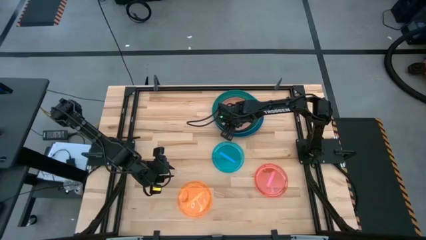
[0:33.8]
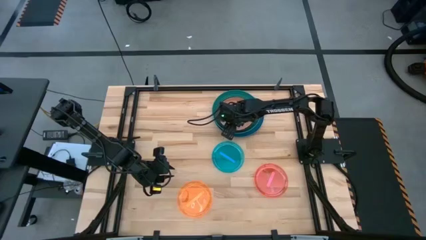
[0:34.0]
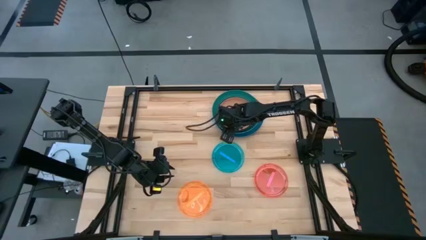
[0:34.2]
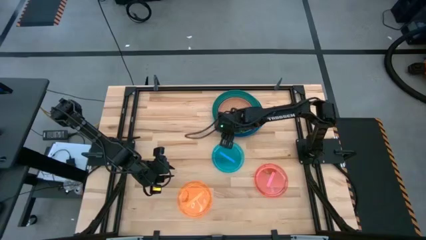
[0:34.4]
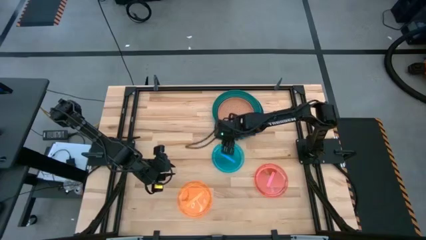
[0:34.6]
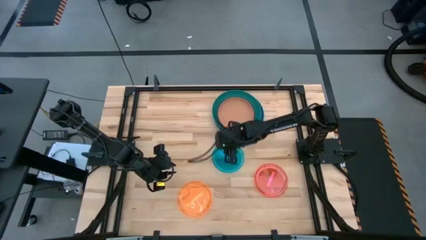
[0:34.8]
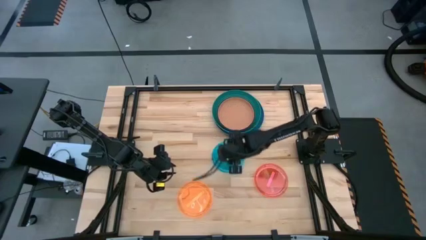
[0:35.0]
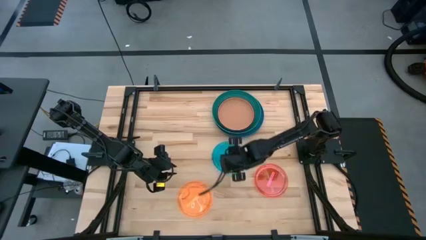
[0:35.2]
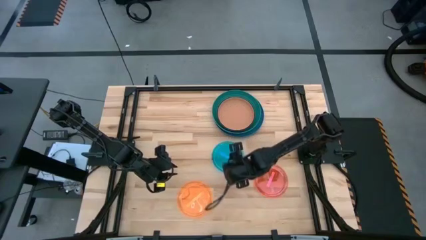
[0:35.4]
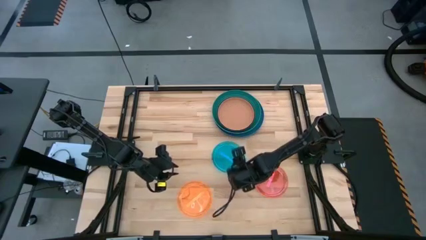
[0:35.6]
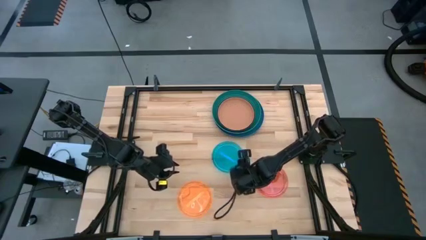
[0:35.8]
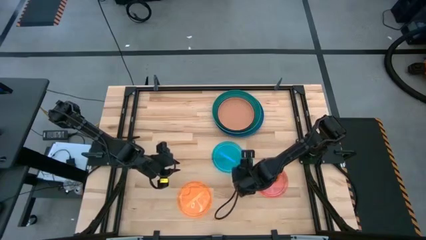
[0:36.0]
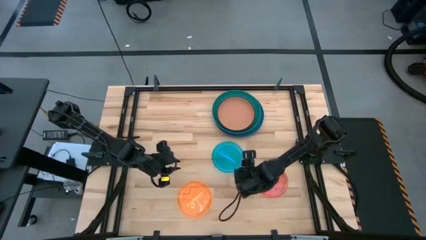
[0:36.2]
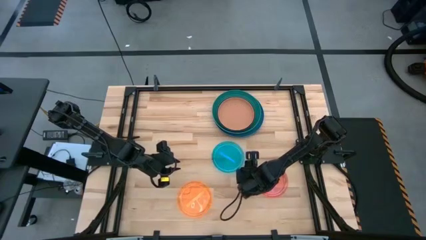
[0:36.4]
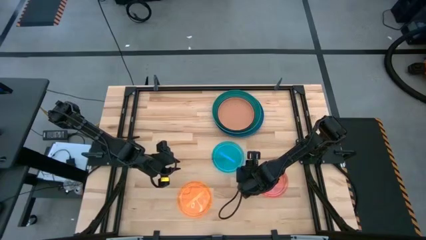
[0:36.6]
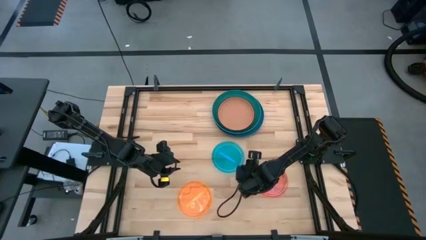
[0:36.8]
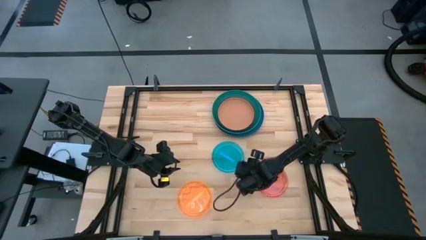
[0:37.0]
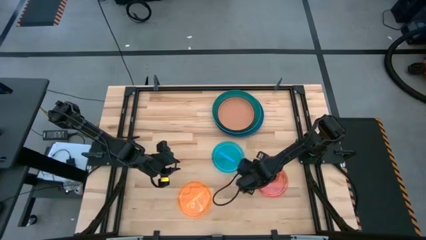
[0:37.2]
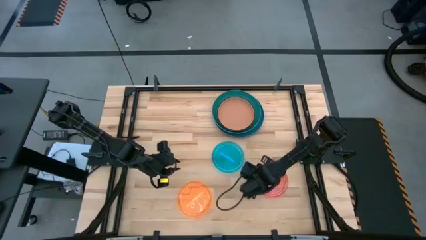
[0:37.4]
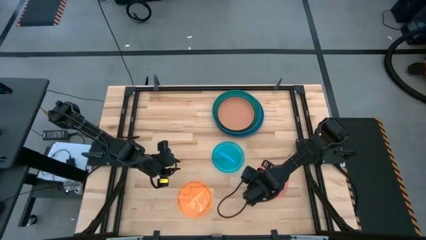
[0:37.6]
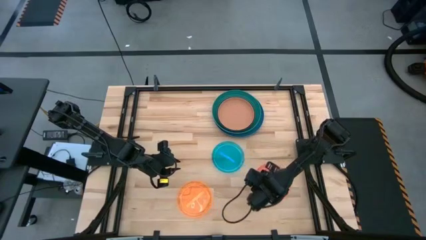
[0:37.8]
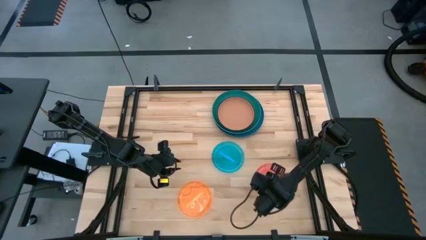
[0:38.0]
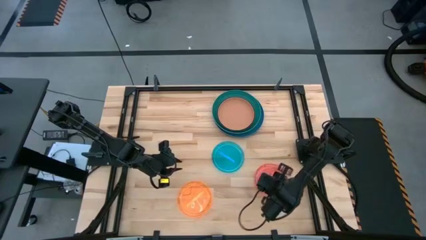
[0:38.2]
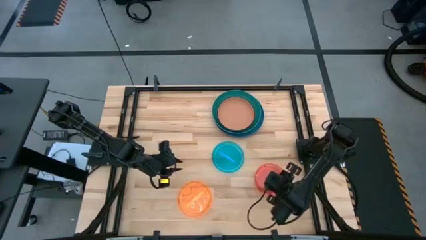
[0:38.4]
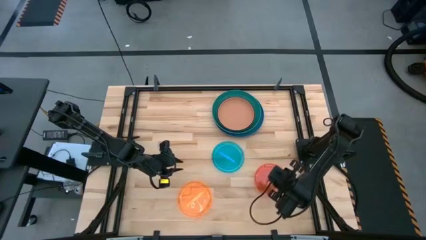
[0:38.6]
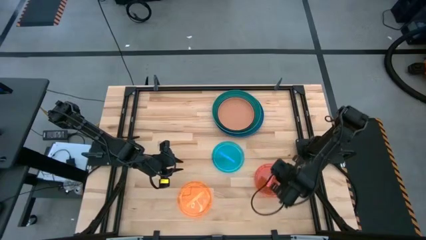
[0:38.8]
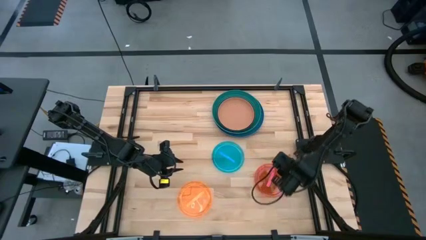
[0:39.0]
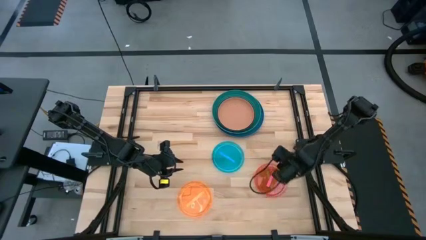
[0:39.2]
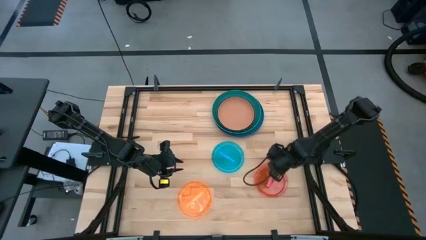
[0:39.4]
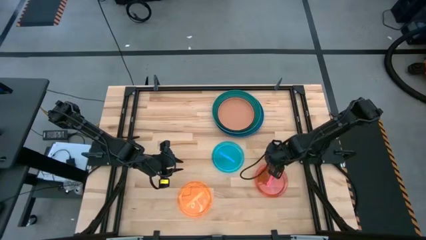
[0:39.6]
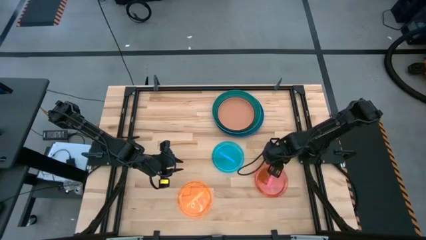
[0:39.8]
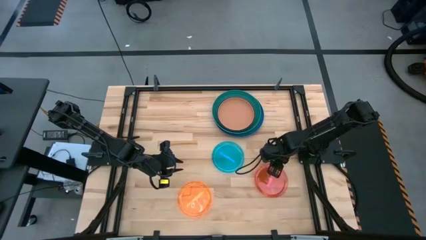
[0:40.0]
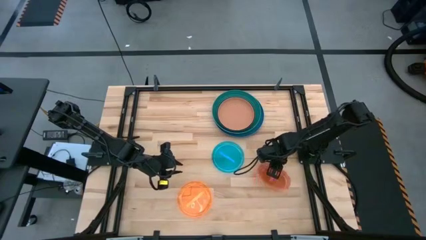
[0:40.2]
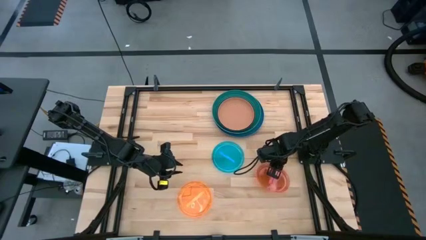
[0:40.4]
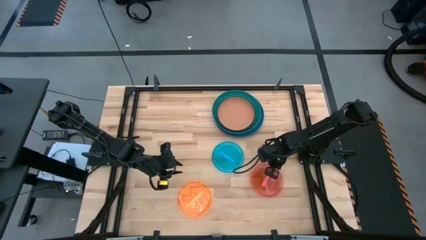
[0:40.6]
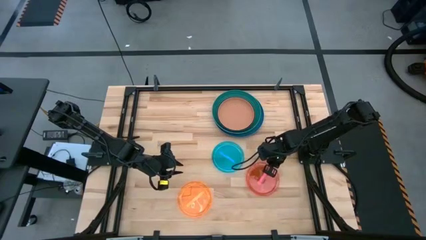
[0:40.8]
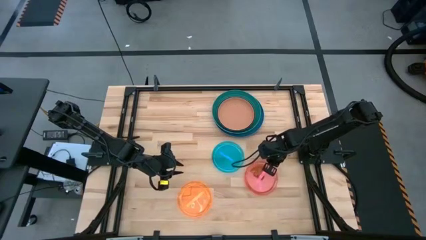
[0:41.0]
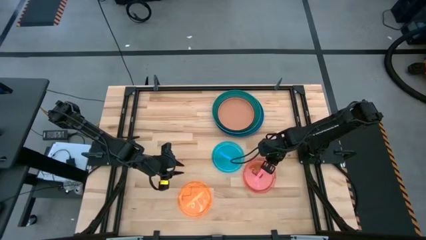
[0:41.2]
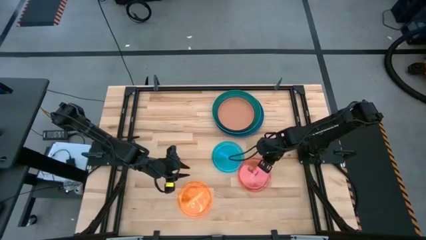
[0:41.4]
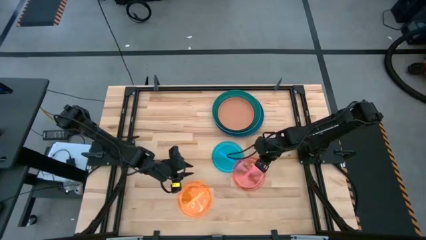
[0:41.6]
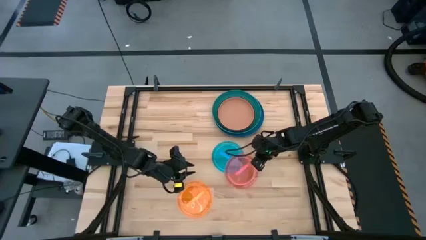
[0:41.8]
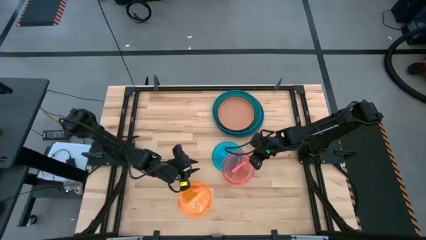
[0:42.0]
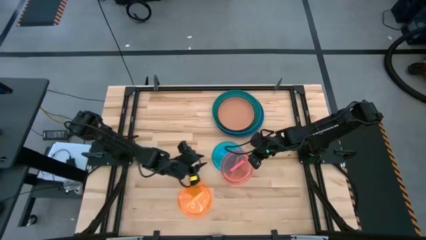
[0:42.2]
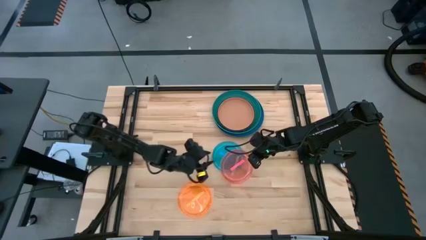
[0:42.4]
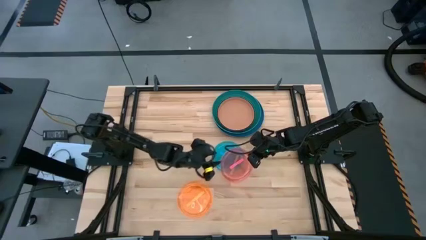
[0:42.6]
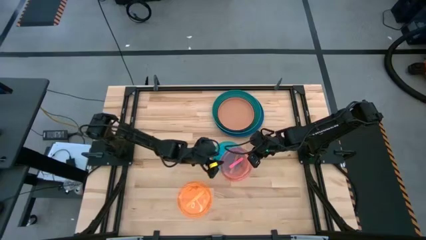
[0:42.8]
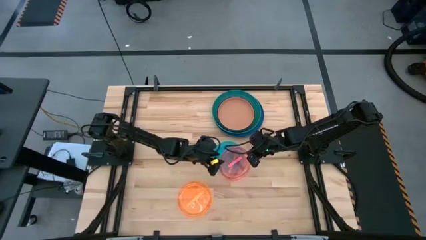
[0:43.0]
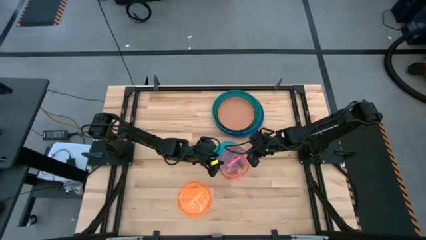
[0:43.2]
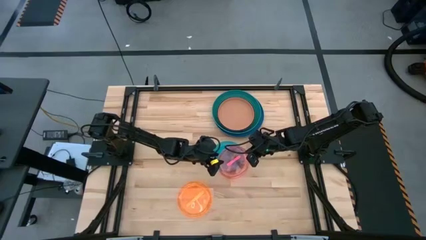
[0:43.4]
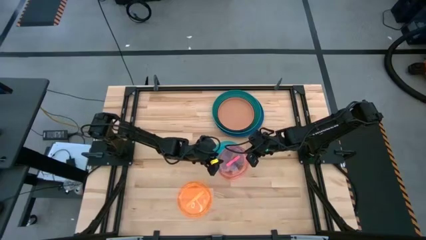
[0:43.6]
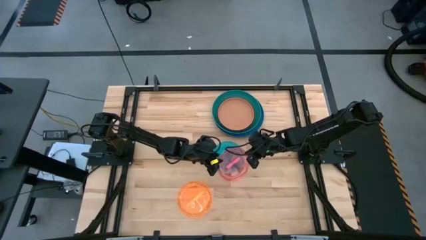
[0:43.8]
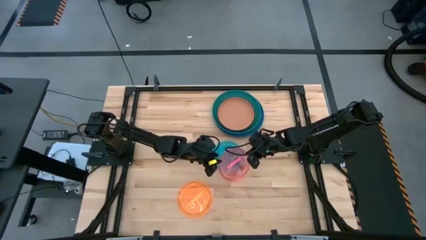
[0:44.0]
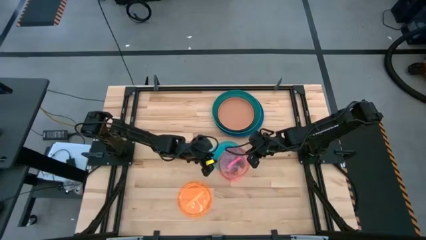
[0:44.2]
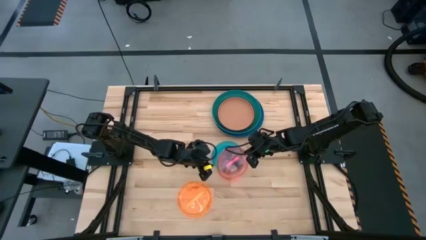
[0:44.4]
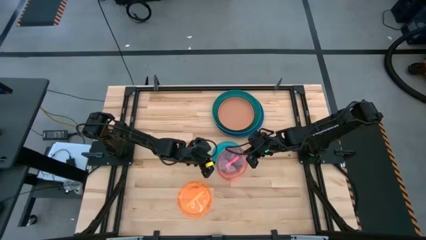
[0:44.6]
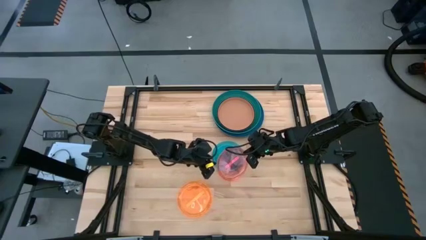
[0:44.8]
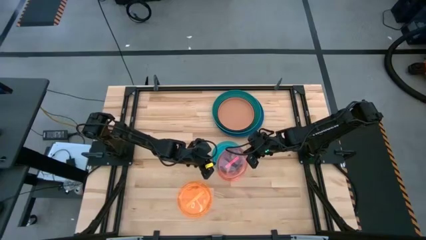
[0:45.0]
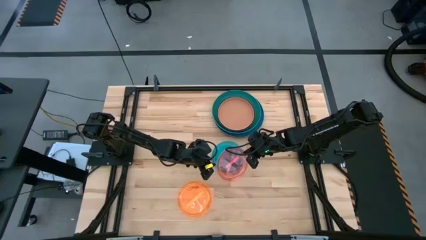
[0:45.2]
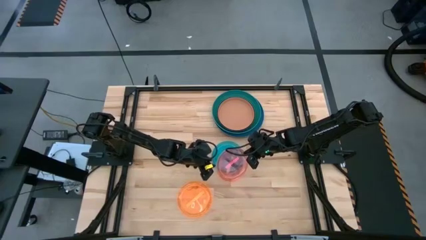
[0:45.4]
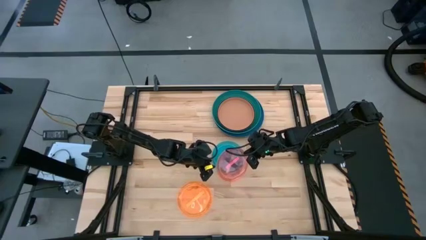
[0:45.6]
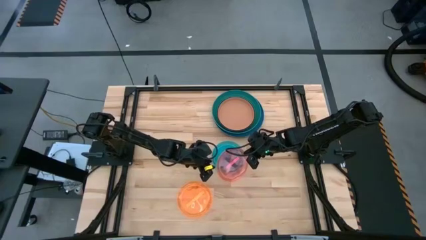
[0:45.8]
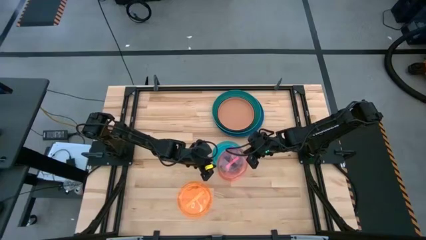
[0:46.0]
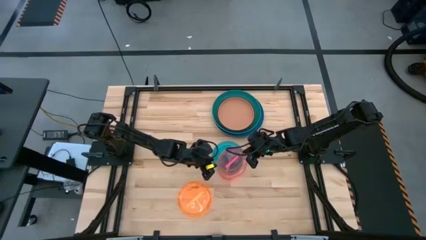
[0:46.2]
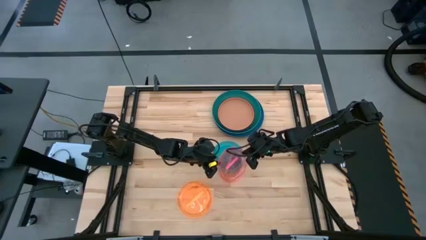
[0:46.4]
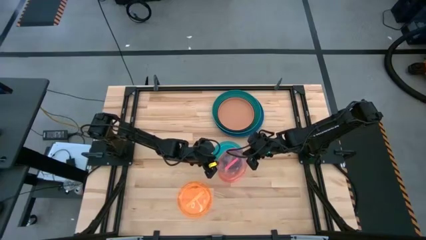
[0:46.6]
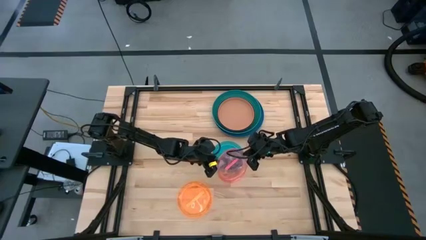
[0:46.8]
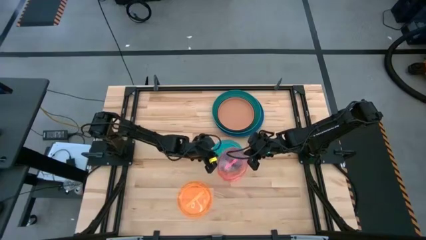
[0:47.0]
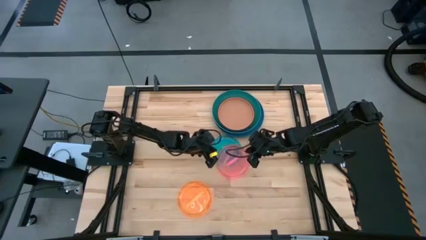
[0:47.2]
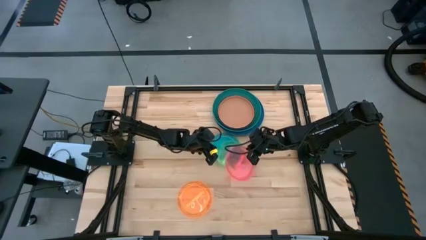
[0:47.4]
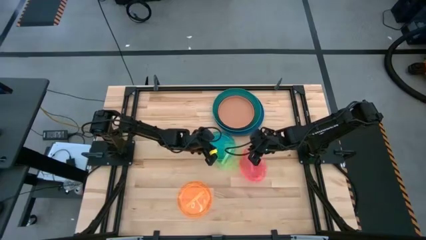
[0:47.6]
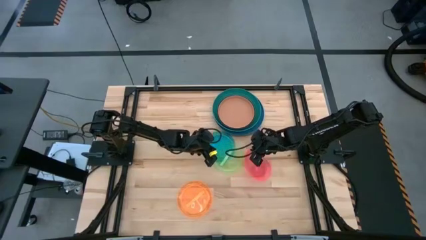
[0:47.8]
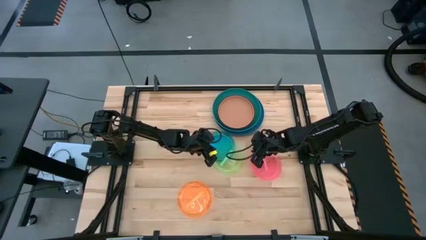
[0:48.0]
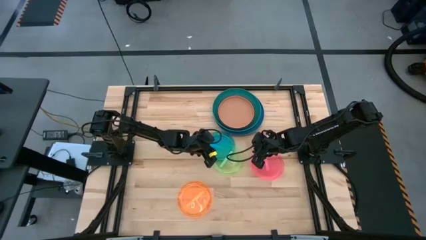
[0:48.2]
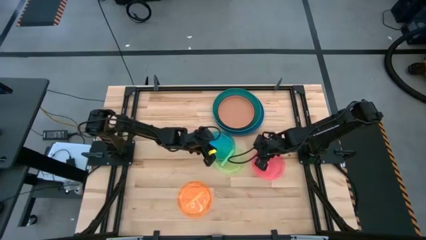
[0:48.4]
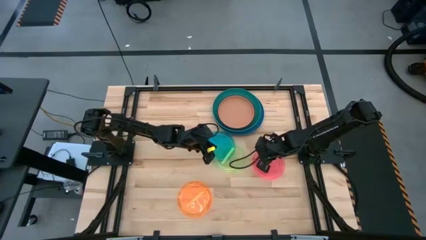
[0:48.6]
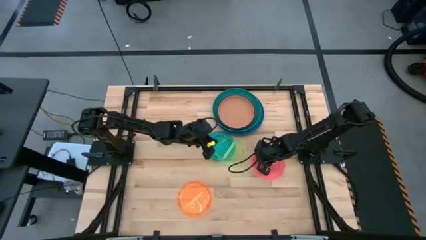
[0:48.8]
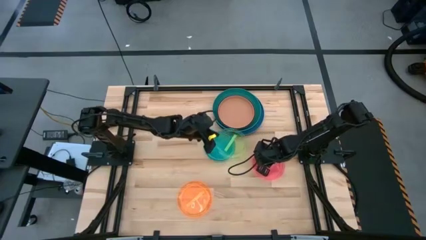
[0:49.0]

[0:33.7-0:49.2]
Task: Stack plastic plates
Stack the light green plate on top of the brown plate

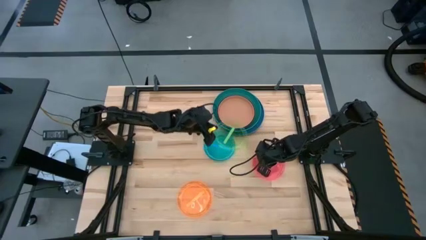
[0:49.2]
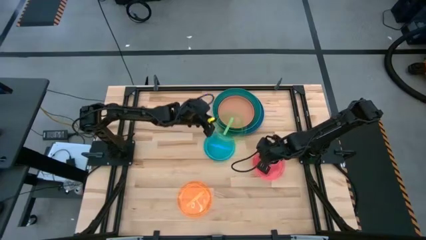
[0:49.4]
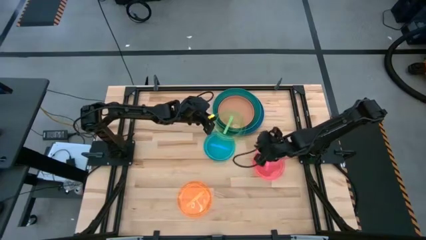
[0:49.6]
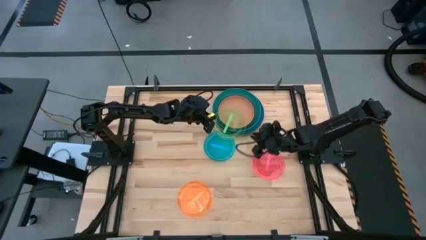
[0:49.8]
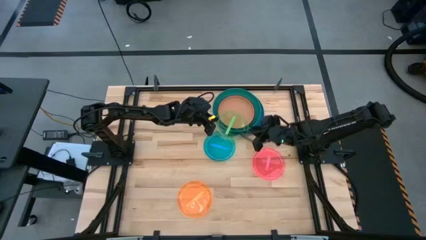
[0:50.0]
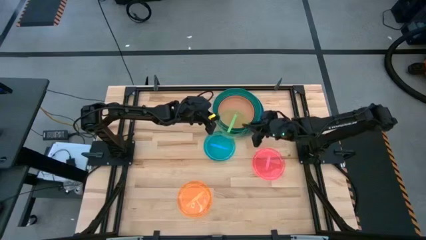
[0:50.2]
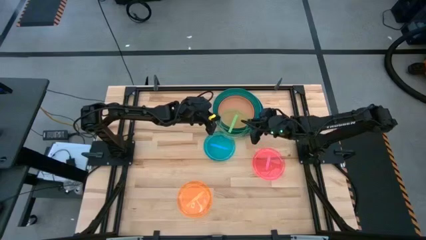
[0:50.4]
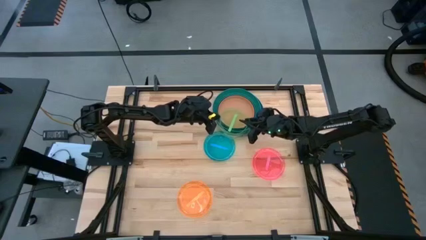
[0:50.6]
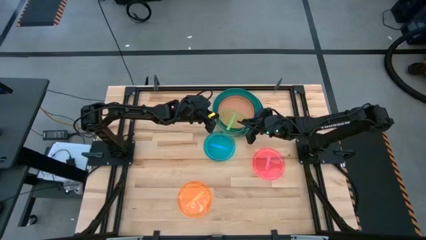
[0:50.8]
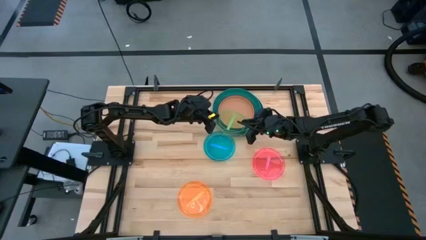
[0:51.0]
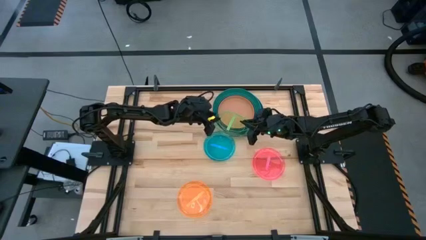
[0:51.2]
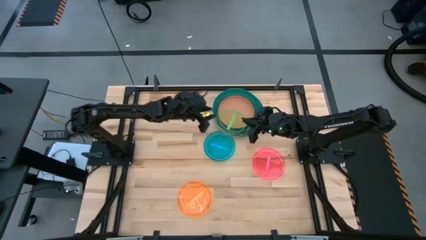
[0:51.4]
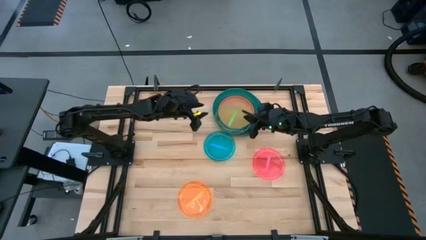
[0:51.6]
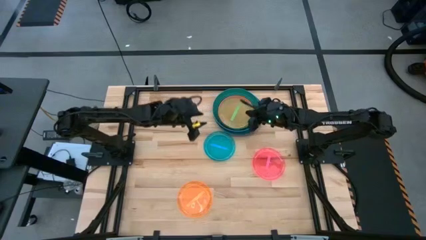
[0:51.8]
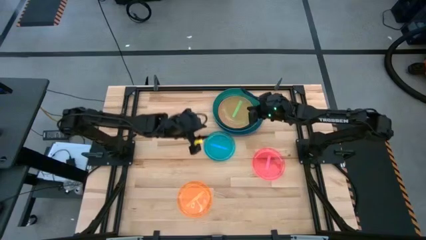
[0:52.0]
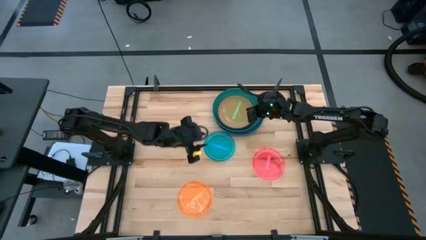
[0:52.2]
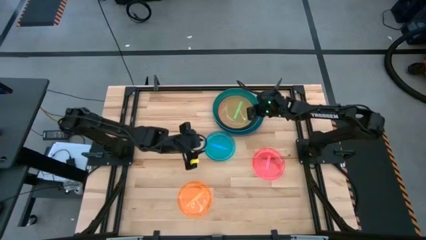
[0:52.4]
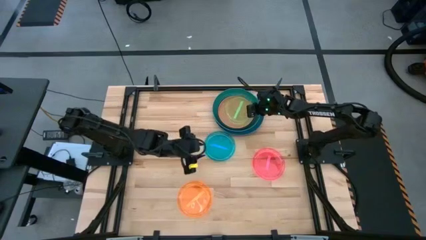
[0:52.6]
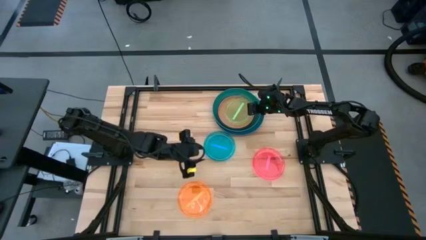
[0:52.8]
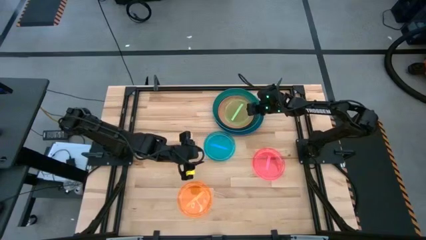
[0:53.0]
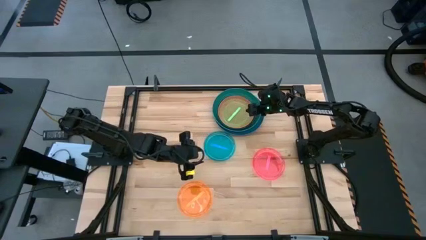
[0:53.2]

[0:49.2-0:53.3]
Stack the light green plate on top of the brown plate
